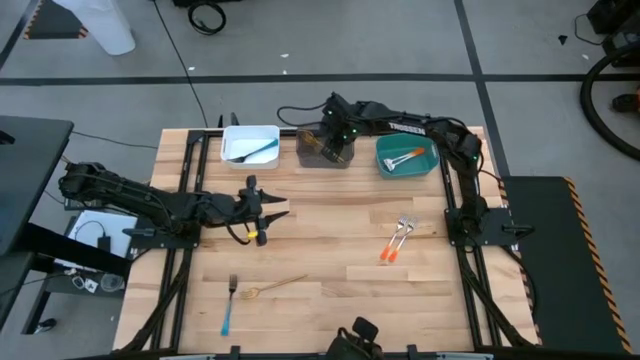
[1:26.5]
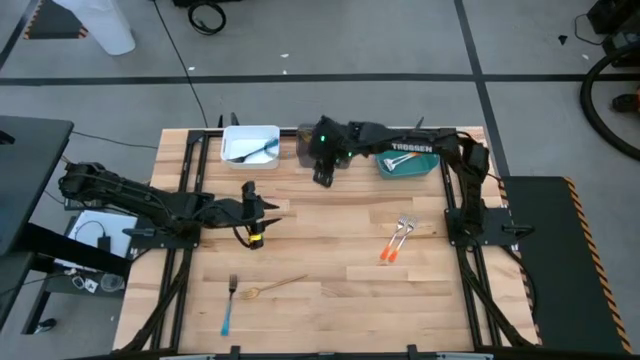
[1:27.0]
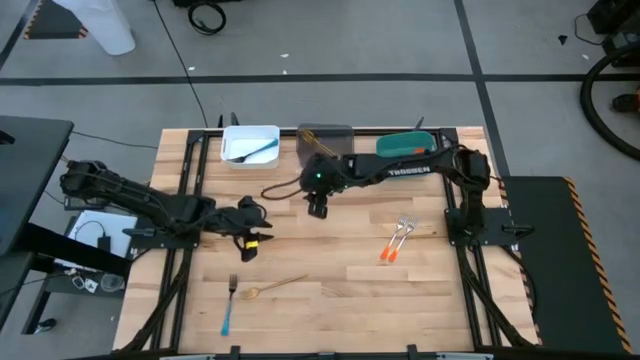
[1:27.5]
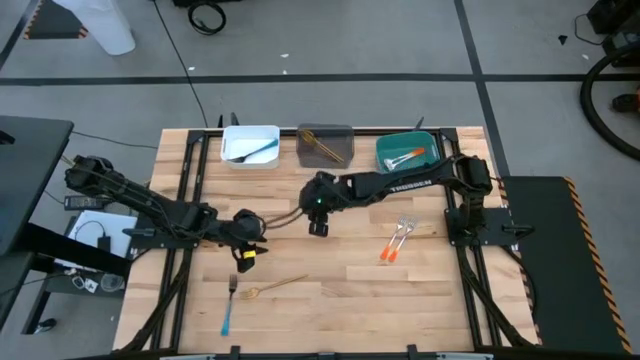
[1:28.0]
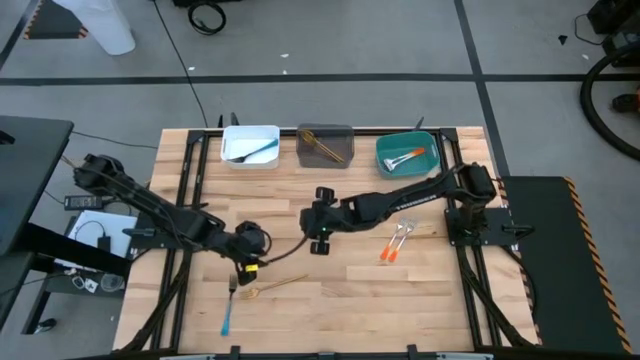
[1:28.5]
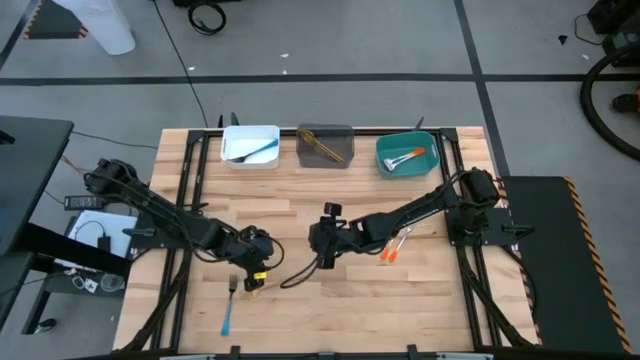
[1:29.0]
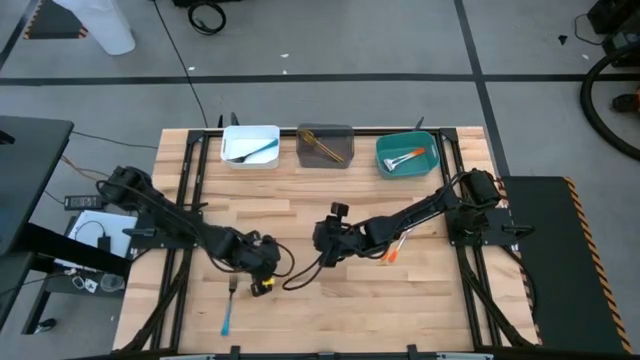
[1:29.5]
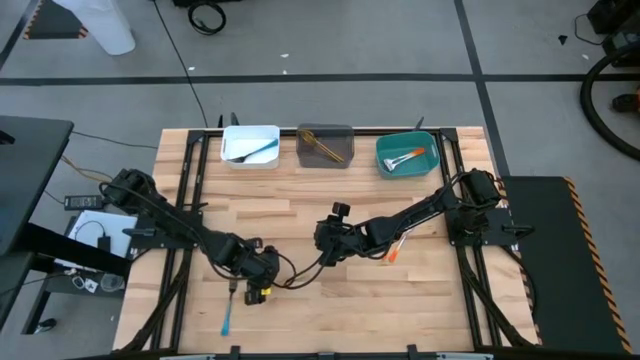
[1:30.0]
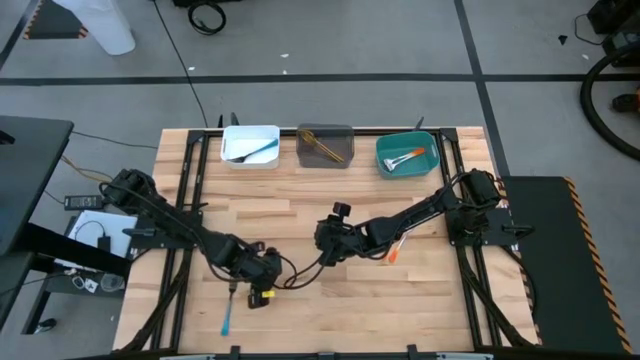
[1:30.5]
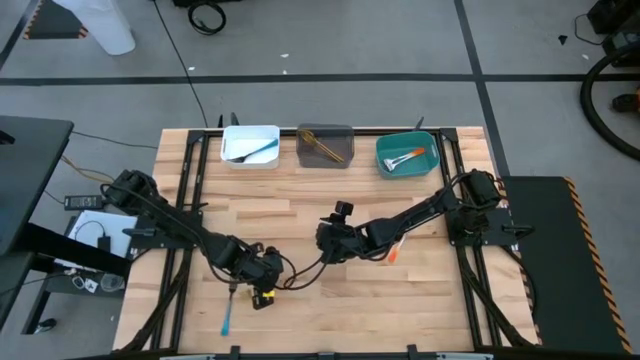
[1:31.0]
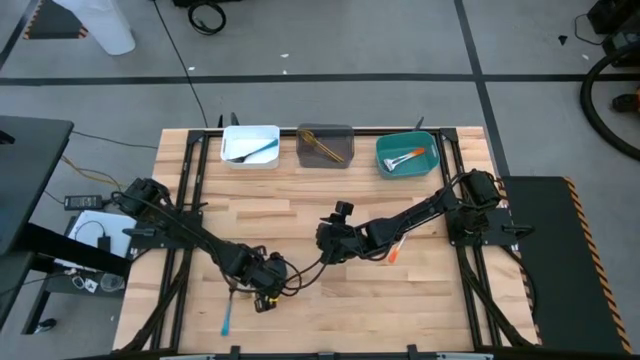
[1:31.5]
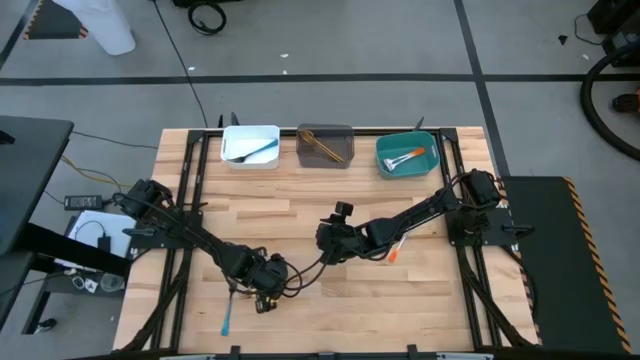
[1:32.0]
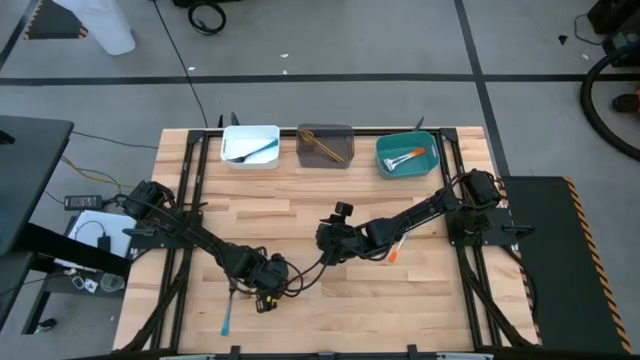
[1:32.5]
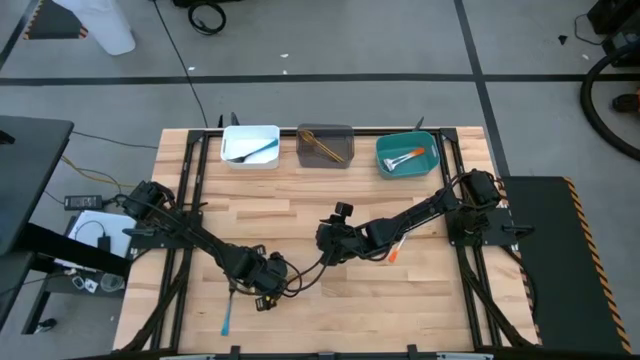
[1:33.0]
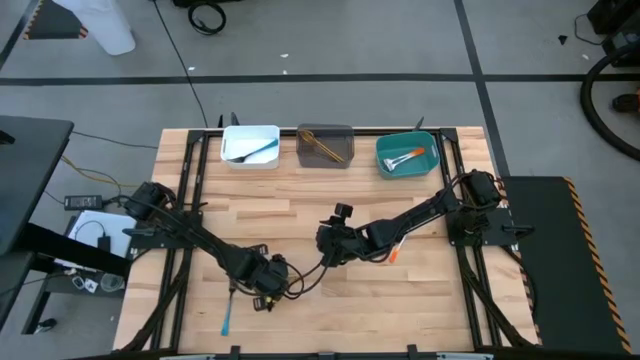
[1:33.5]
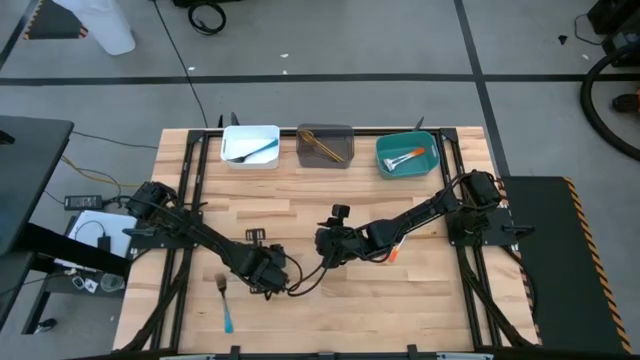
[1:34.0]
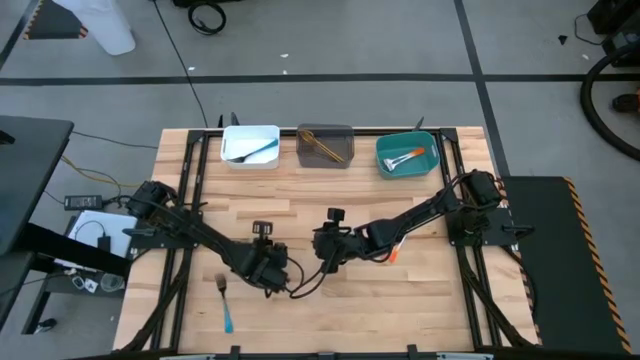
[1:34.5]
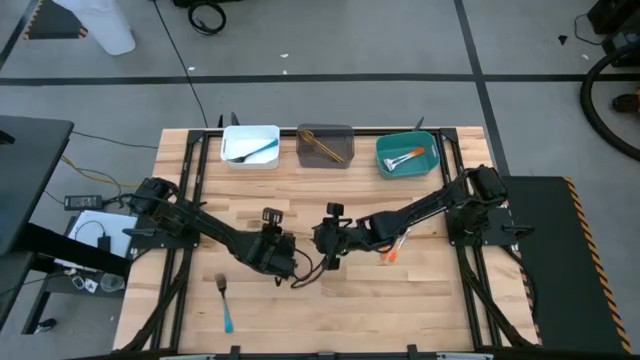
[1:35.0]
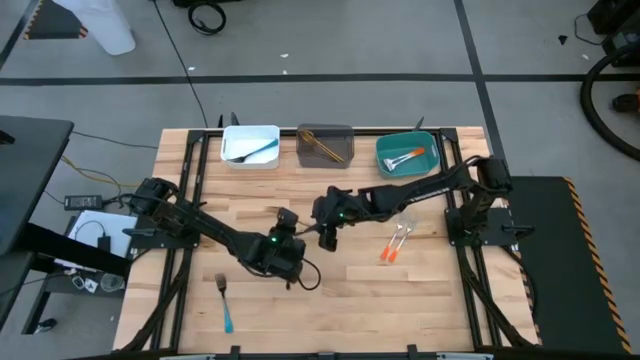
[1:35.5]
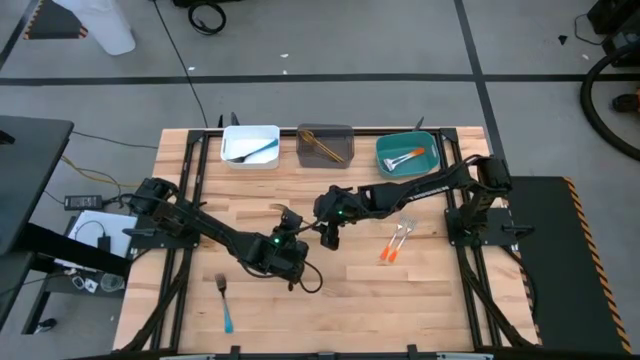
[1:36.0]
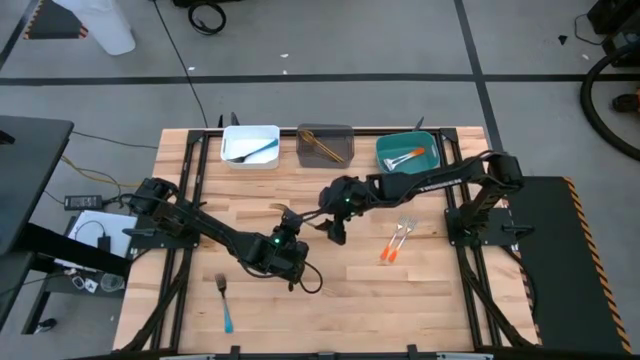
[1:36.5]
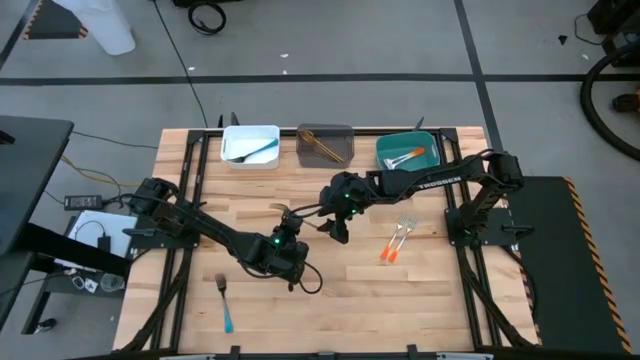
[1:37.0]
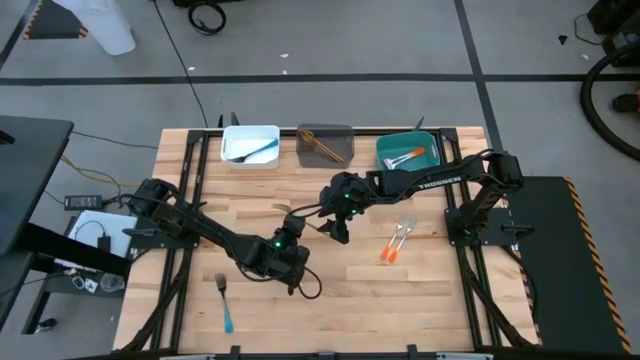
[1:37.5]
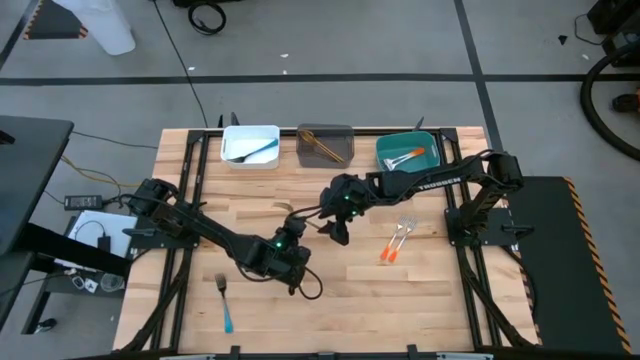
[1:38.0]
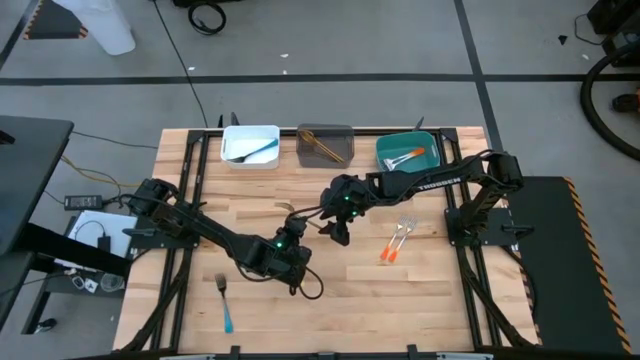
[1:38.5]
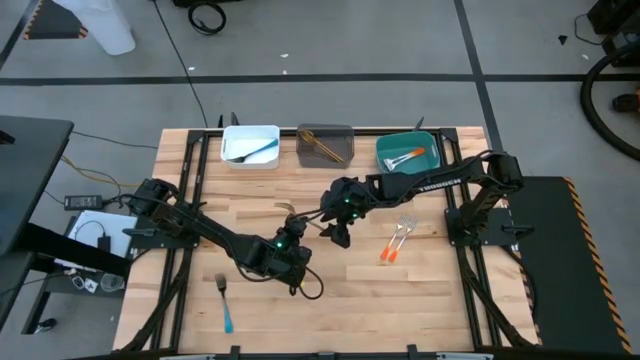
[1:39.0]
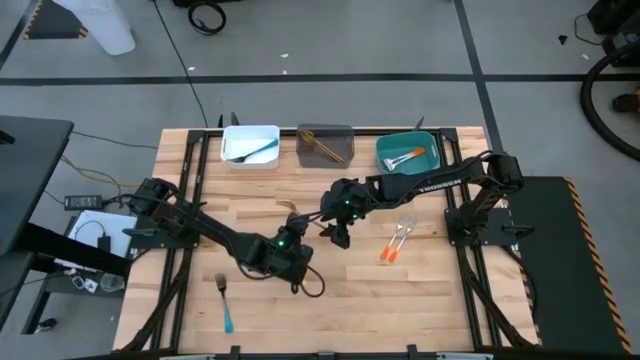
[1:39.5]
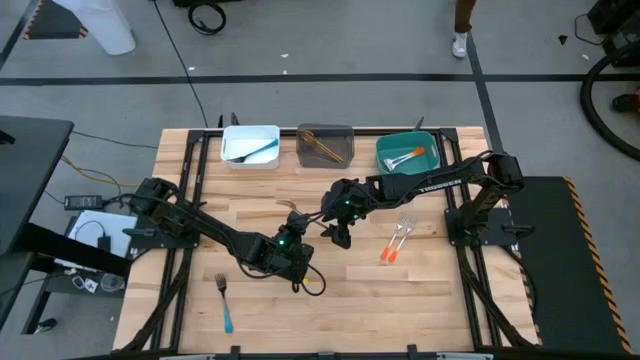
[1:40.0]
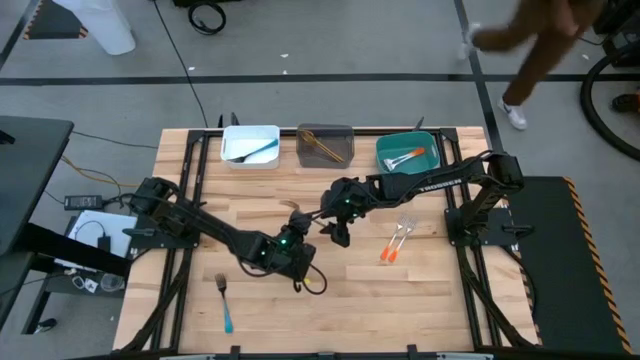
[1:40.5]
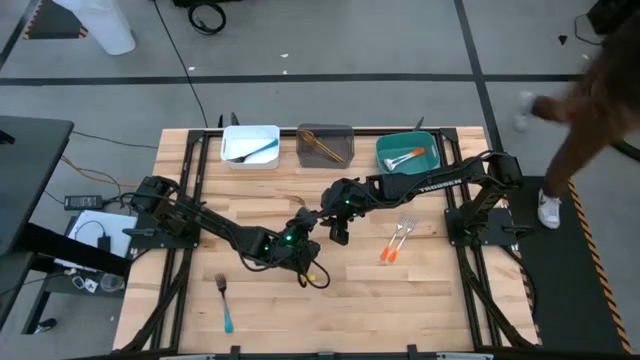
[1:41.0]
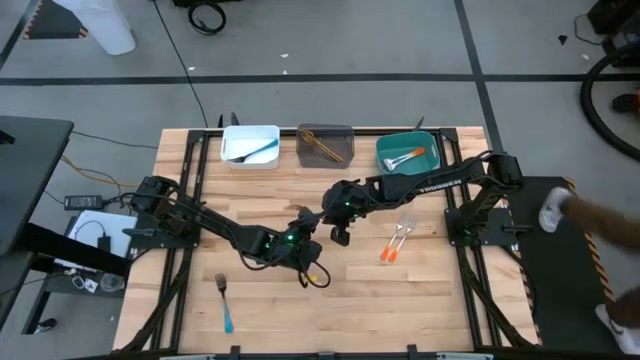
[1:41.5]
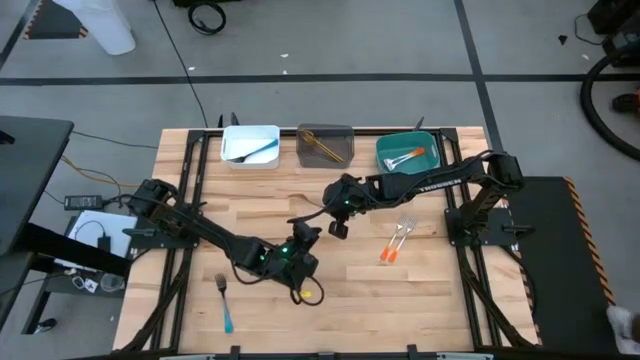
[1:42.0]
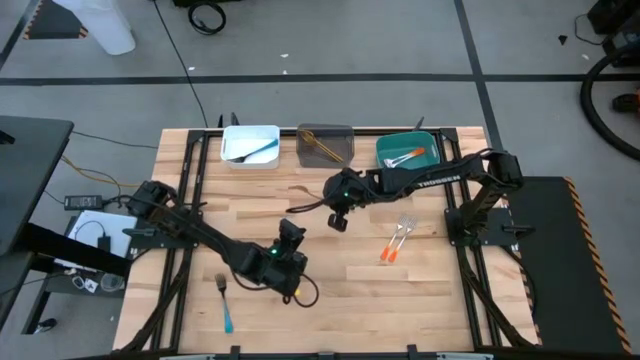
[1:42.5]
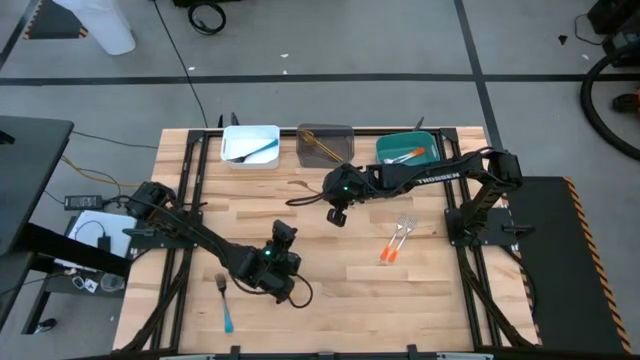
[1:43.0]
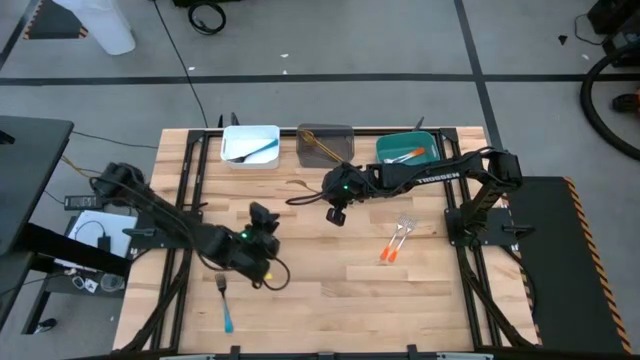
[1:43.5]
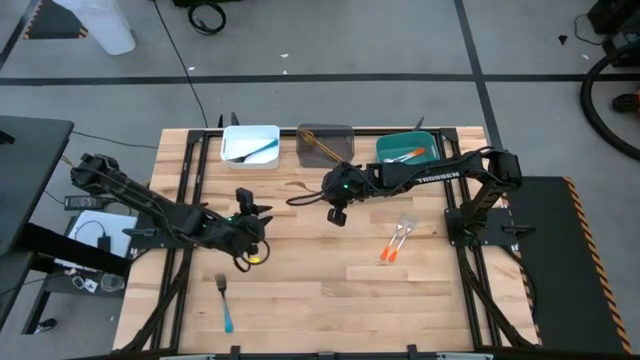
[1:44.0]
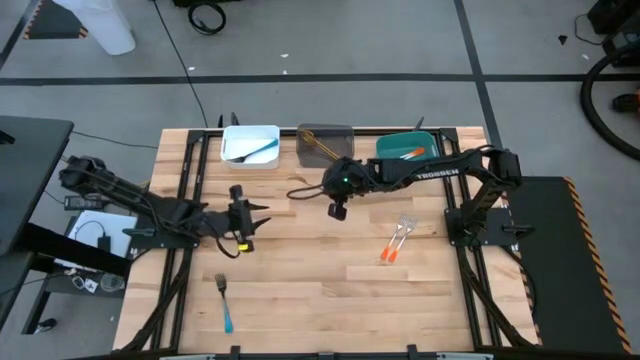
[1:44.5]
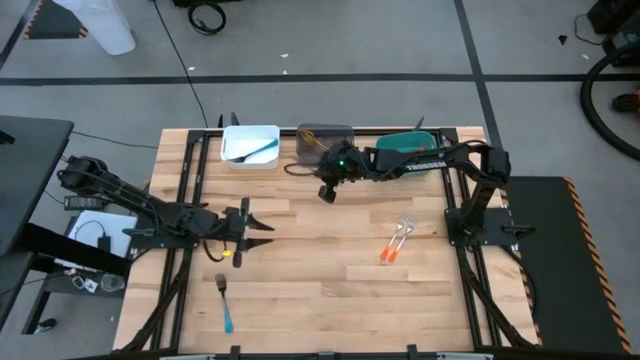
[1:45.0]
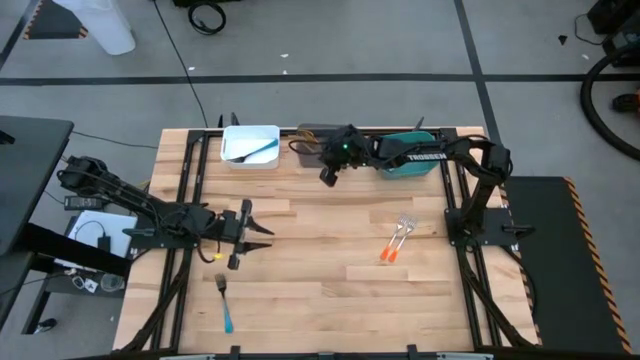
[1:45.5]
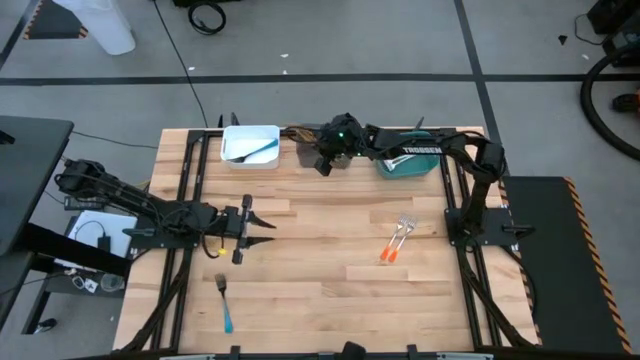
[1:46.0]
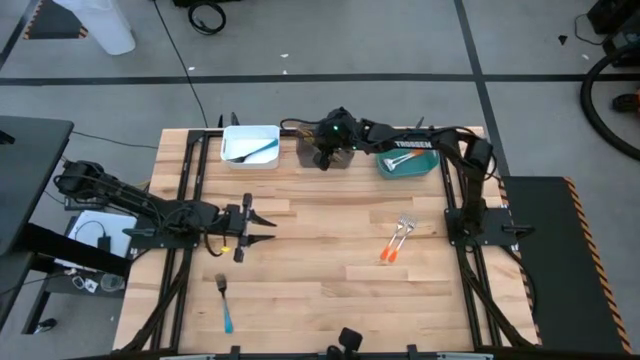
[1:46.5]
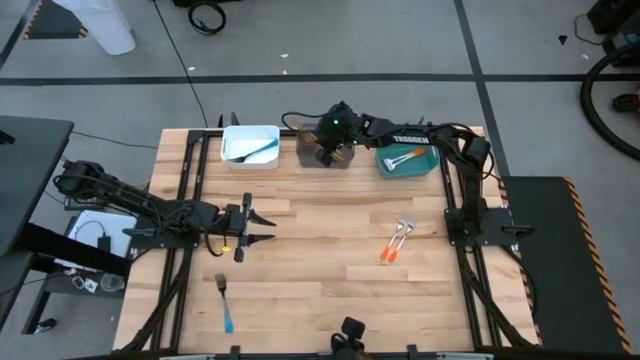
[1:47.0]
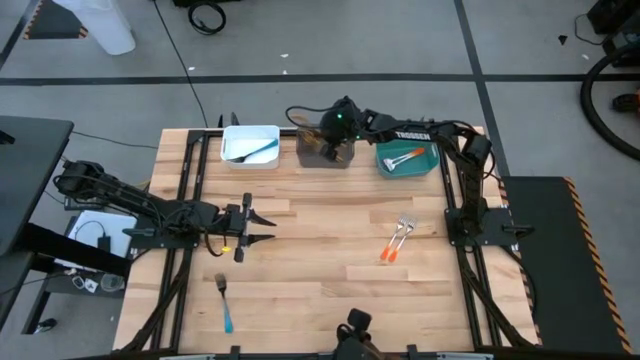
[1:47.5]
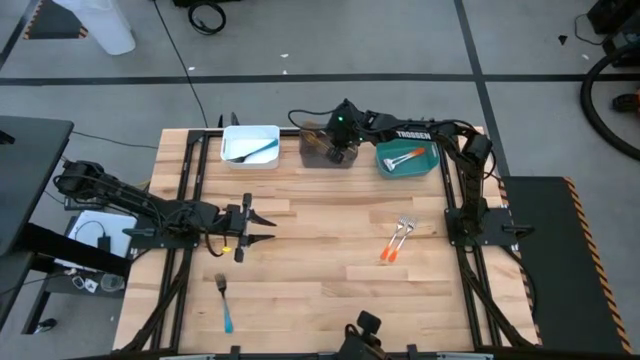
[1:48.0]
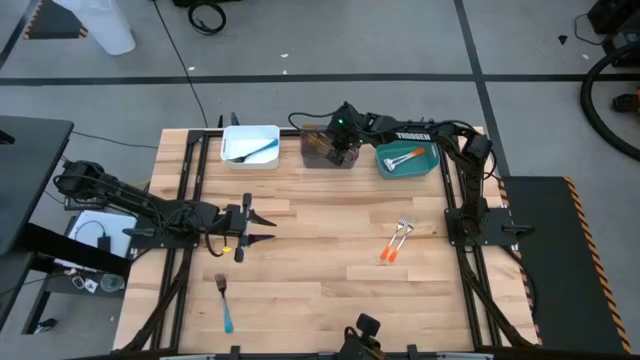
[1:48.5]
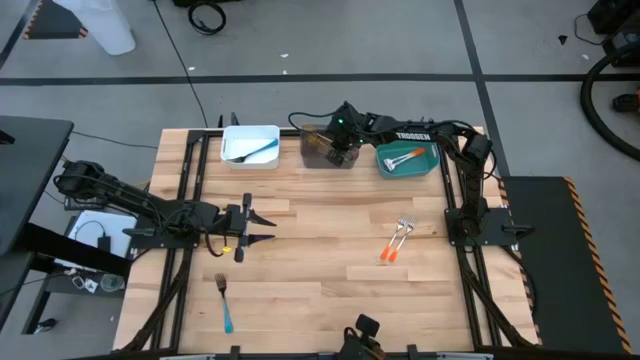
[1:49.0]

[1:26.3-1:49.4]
Task: Sort silverware by color (type)
Put the gold fork into the black bin
